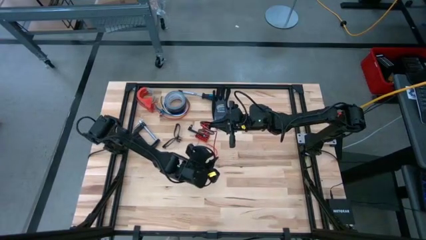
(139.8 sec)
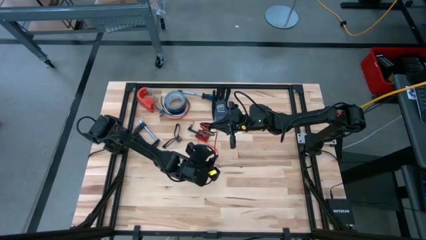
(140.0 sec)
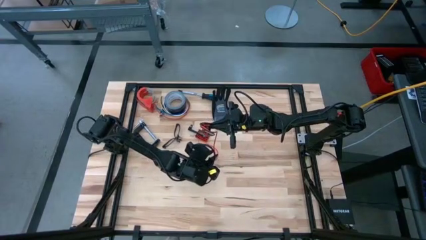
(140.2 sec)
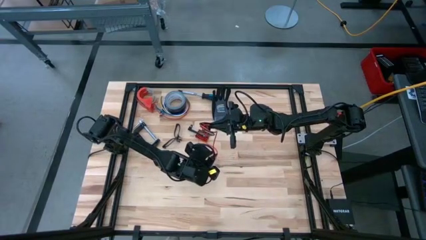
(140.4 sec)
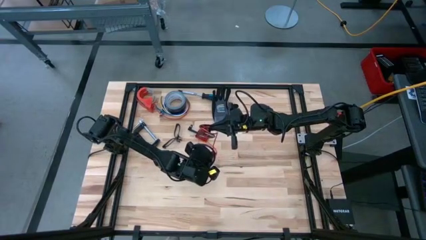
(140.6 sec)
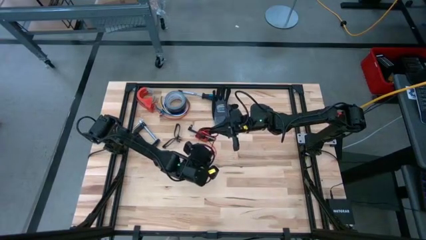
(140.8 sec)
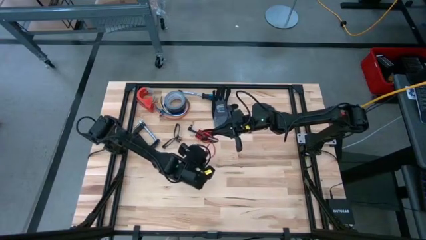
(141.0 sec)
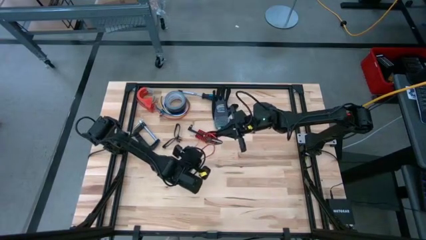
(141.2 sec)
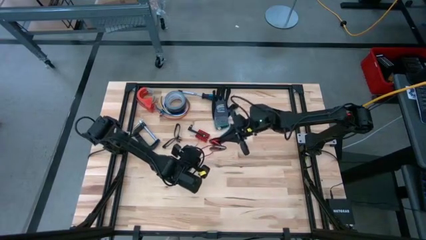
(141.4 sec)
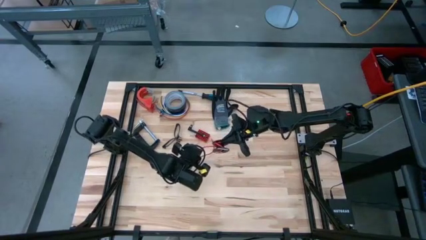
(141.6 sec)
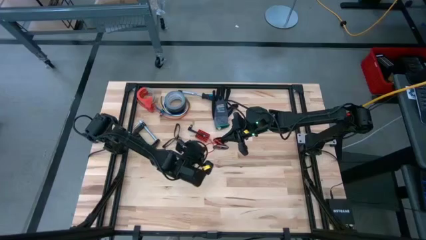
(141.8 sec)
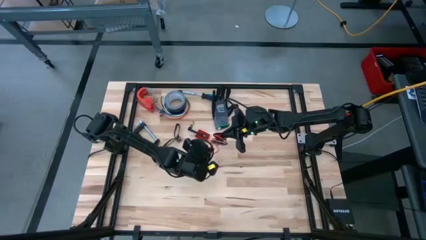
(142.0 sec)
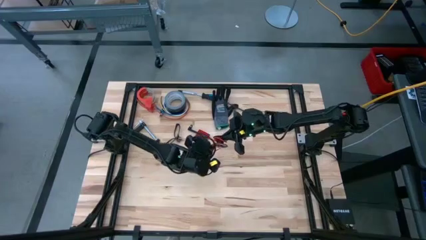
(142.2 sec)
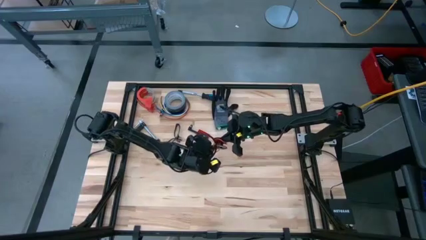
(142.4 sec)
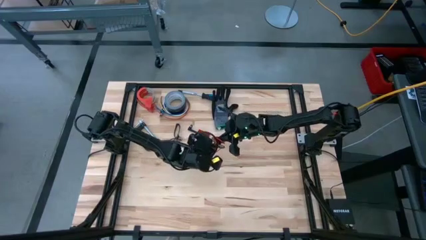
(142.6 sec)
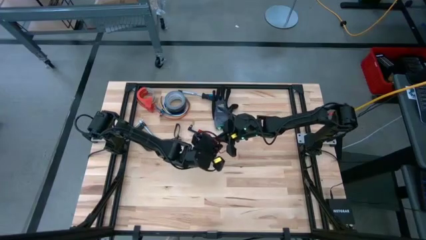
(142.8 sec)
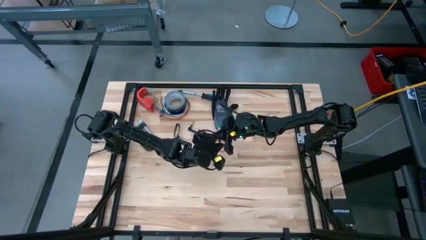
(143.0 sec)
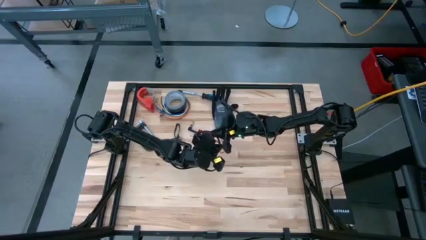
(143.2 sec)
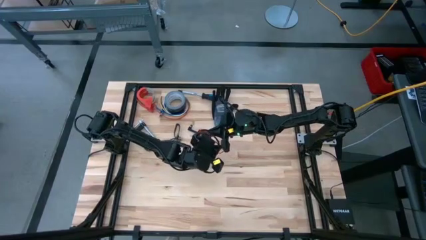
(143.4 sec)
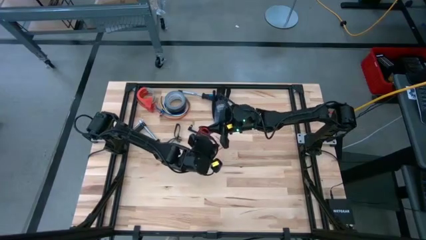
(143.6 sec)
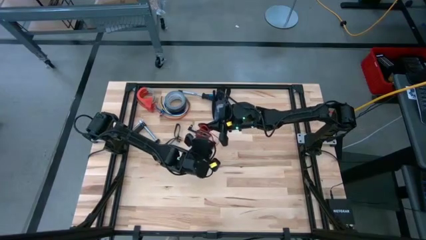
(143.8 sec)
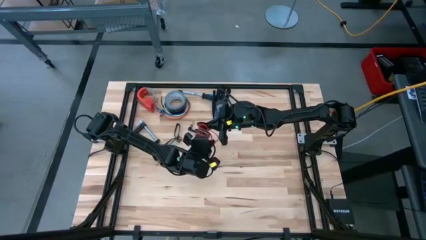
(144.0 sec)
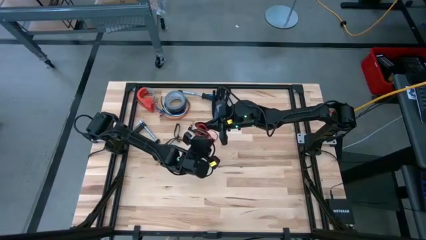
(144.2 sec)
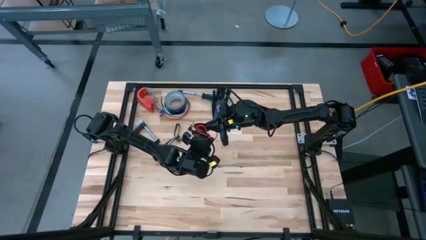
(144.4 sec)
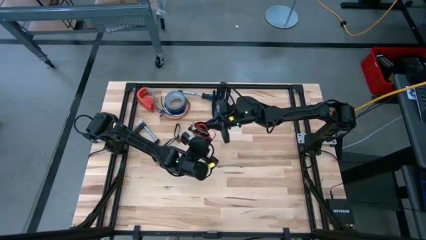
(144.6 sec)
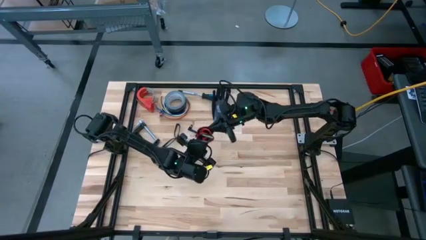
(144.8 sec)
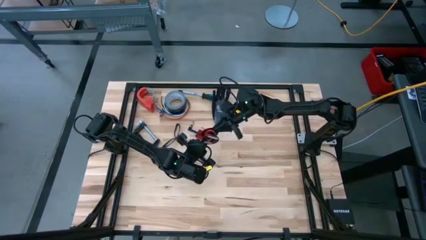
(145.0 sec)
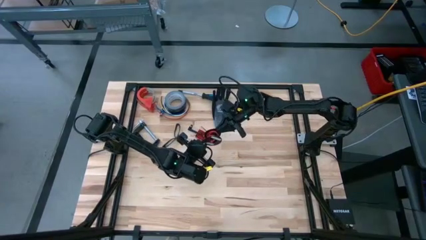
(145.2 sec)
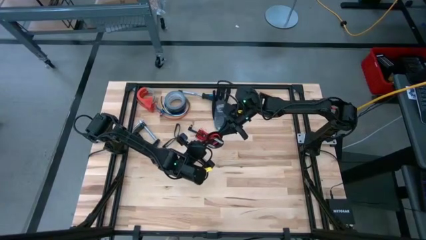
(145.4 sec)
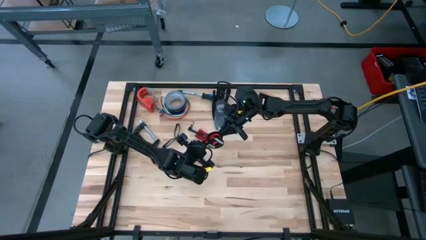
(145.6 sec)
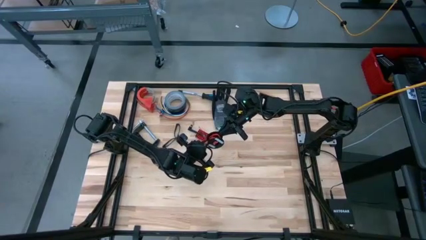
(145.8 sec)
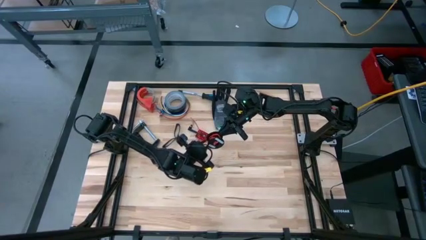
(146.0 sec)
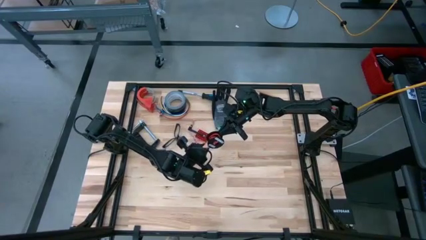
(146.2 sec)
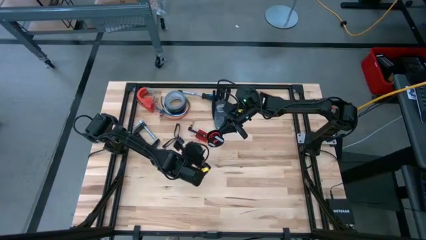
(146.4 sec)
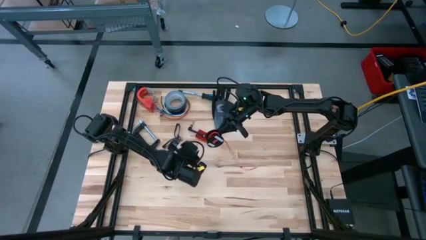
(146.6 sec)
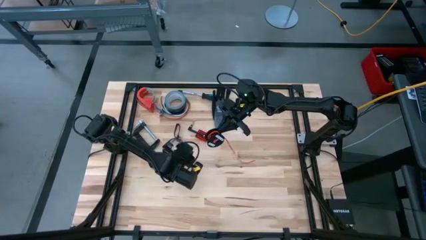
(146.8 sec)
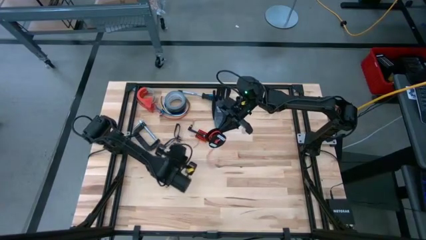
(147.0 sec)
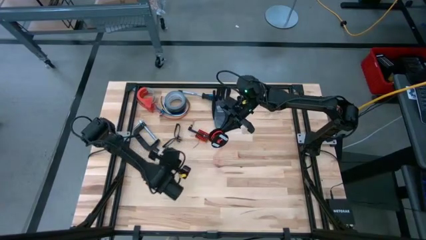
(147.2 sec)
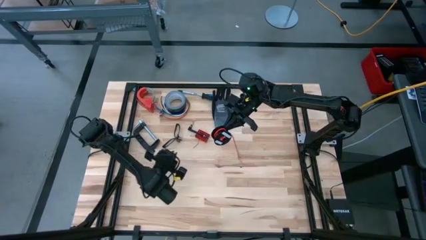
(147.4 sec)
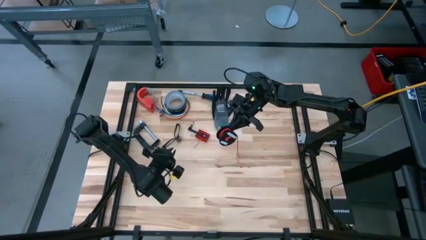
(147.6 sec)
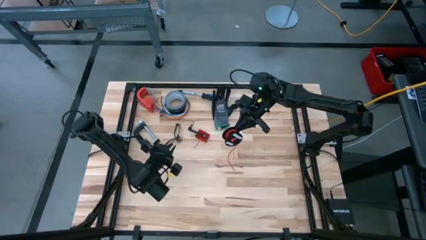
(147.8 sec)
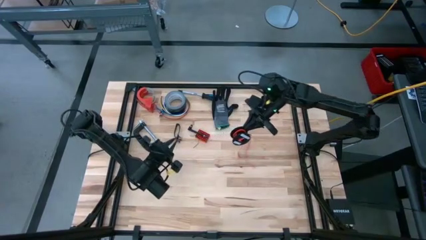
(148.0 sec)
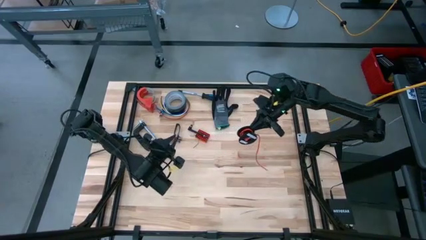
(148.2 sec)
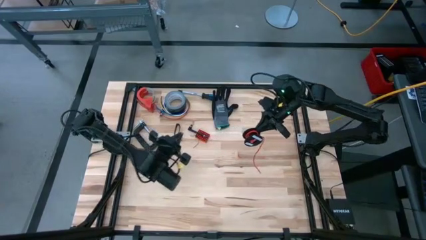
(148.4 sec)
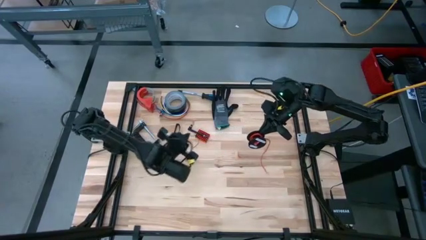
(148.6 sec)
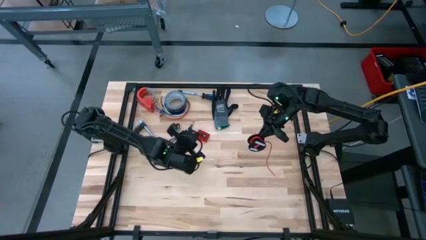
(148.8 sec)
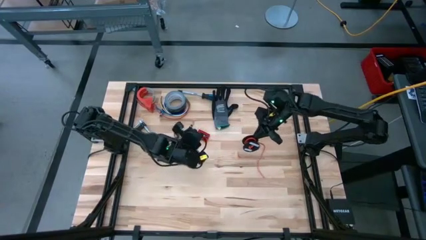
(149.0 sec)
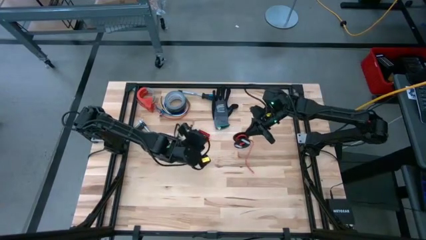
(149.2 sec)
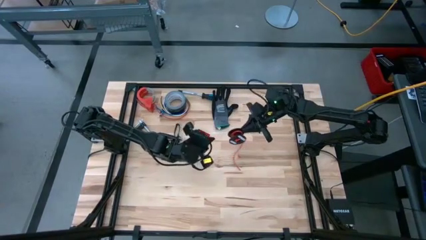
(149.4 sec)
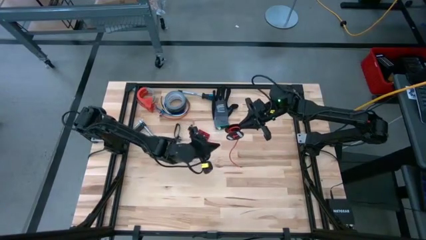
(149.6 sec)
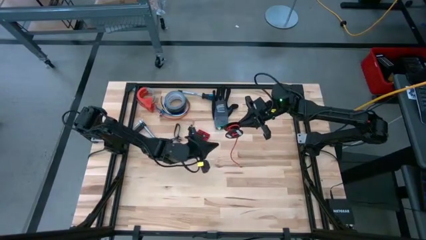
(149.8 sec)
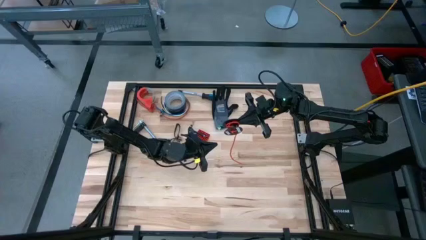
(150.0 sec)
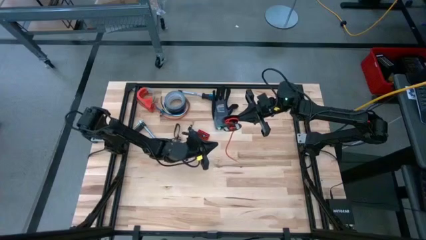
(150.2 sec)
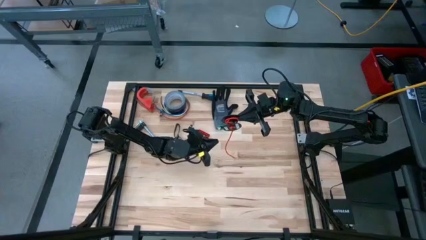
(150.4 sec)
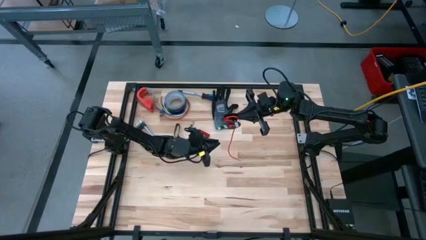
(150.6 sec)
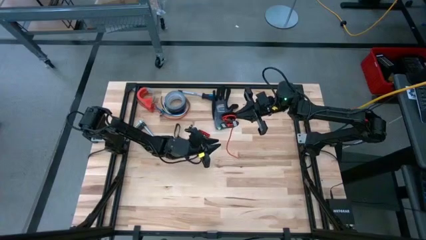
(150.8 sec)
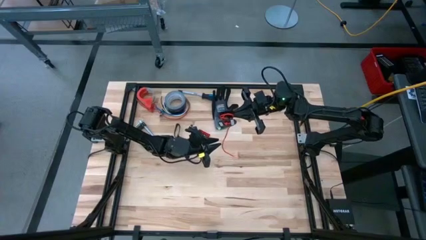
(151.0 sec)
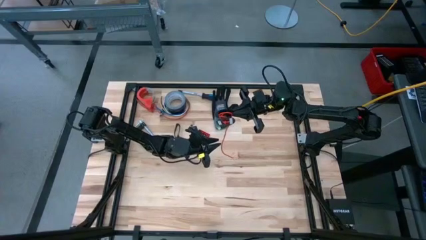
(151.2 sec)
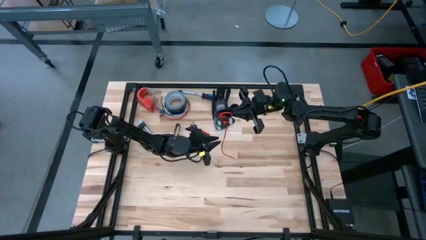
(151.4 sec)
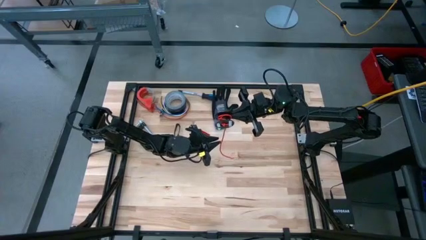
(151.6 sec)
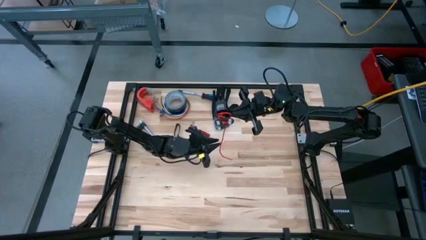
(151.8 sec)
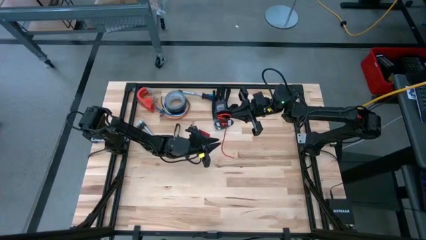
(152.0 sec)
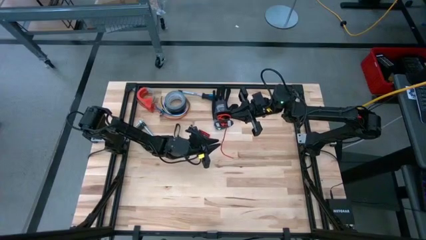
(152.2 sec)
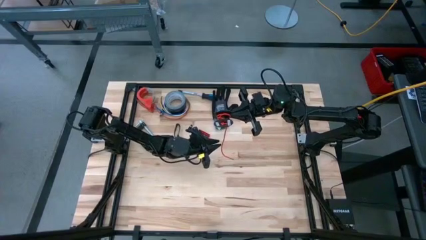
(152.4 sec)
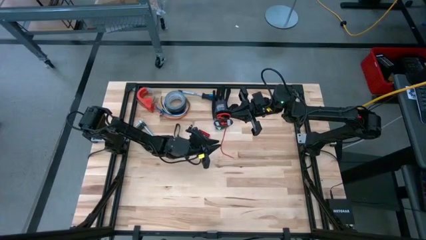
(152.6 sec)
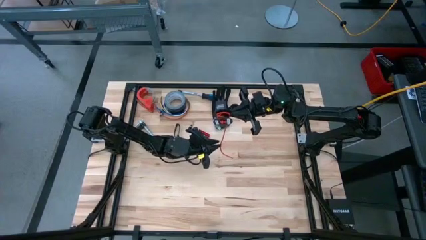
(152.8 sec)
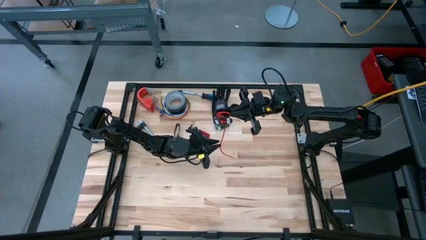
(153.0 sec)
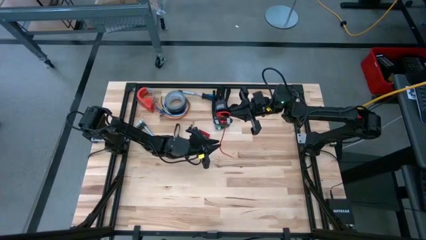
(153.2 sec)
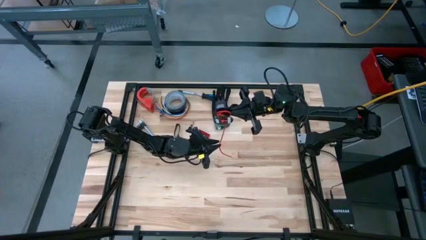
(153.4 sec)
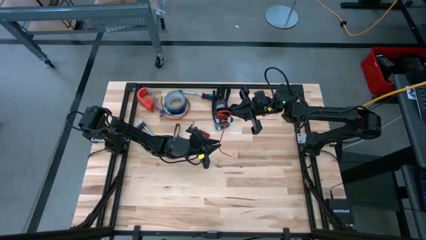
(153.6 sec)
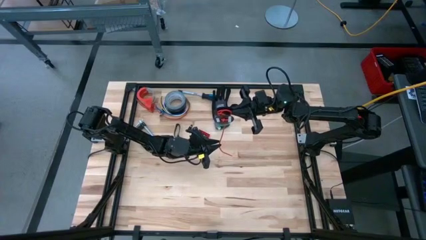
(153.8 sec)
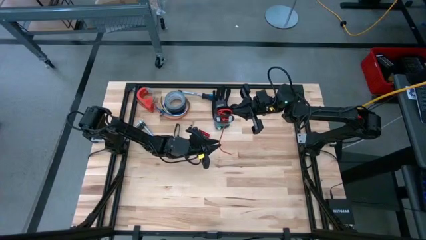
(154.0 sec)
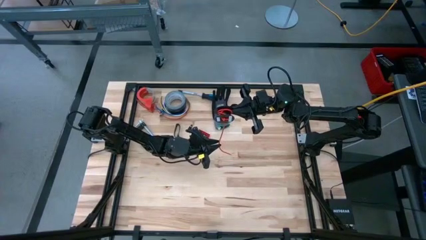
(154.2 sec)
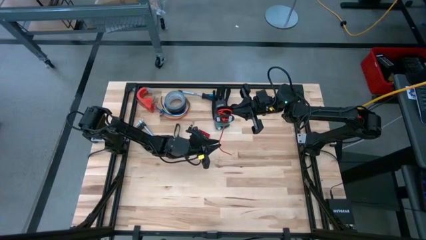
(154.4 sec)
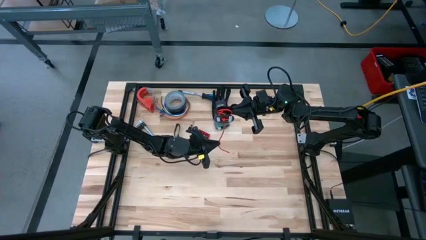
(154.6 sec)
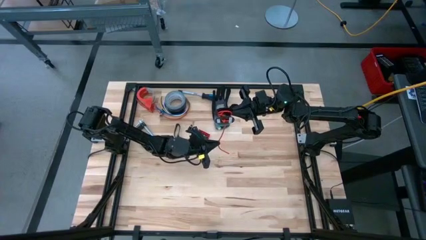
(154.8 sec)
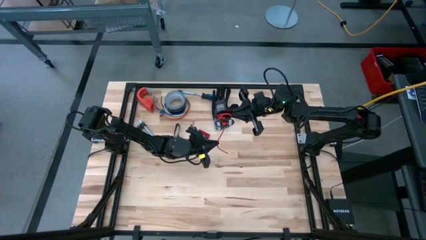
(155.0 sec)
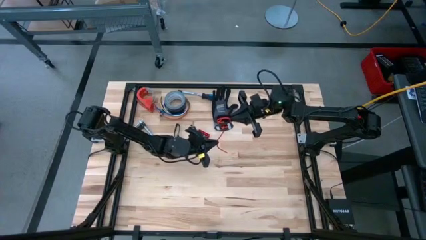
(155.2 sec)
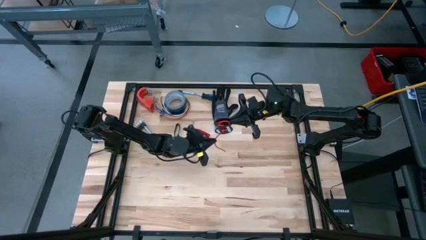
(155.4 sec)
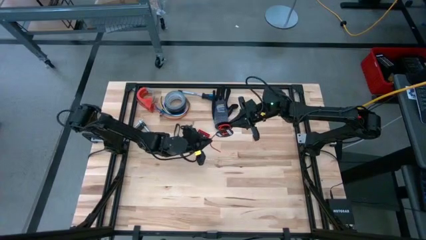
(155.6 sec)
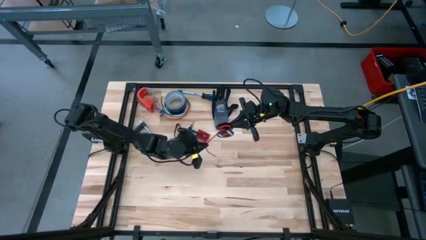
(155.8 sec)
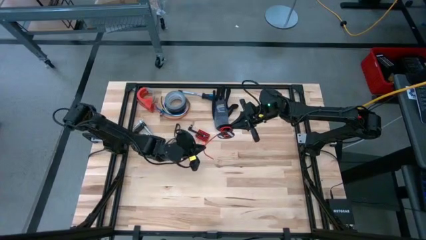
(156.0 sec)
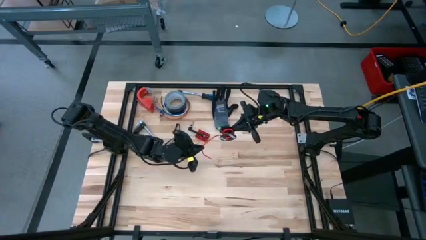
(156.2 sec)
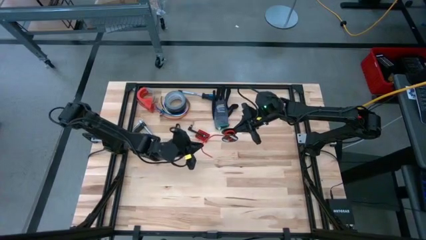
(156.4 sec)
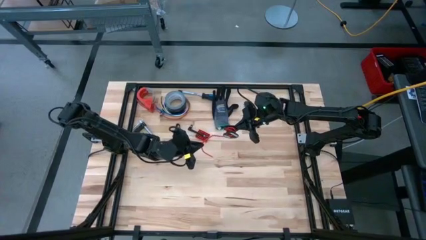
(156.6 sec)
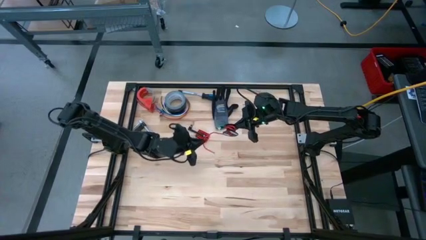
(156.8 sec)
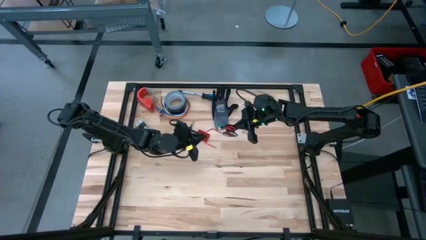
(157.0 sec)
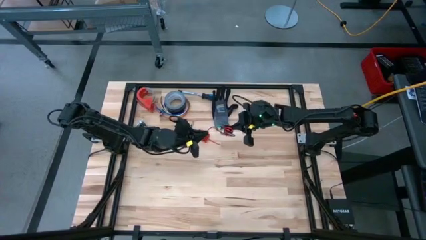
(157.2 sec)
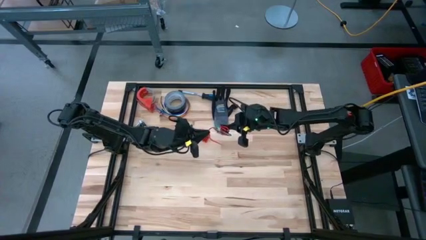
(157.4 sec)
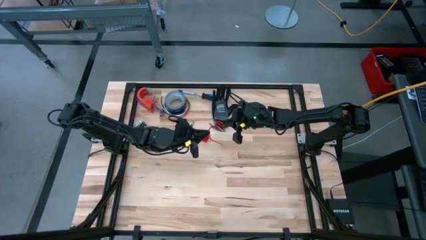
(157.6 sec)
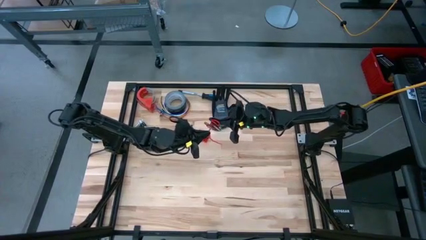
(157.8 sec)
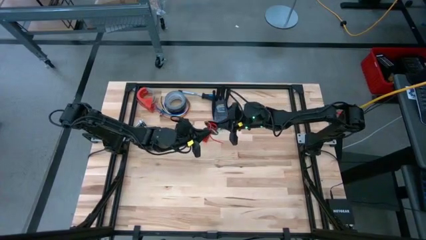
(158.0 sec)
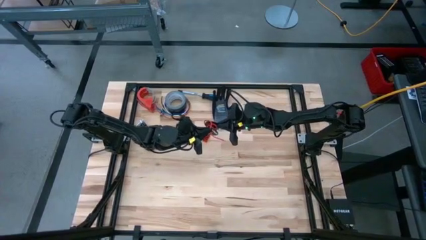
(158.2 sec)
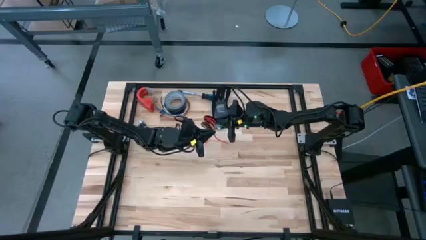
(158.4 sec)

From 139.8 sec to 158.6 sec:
Task: Coil cords
Coil the orange wire into the black spool
